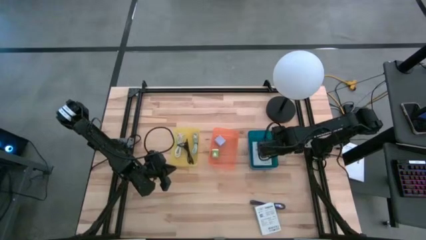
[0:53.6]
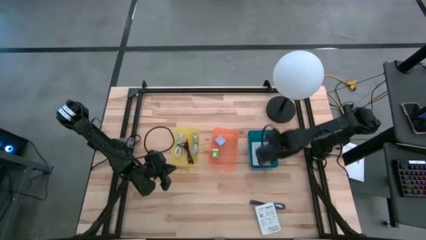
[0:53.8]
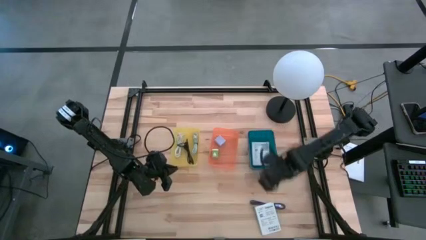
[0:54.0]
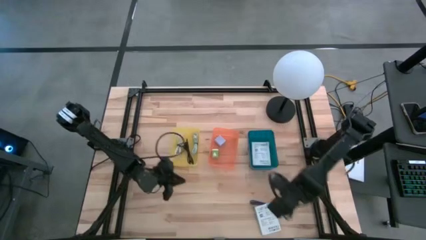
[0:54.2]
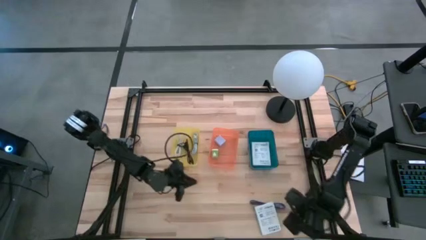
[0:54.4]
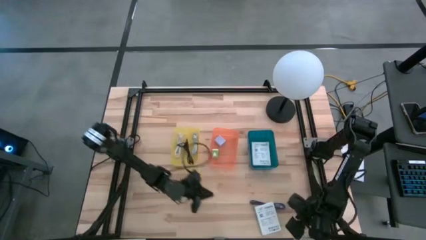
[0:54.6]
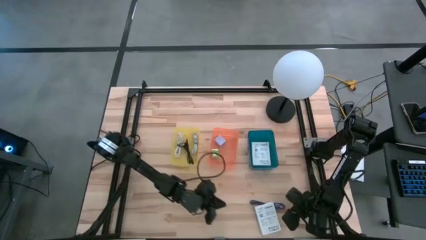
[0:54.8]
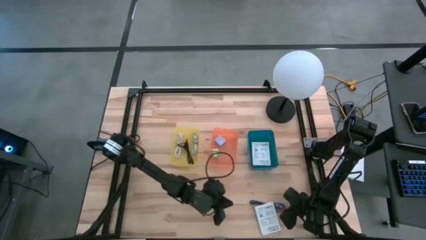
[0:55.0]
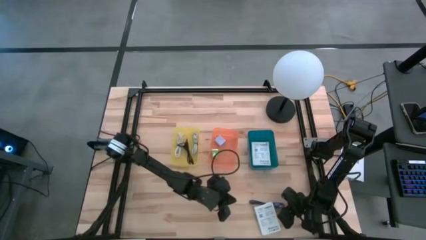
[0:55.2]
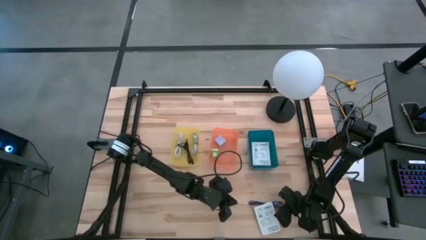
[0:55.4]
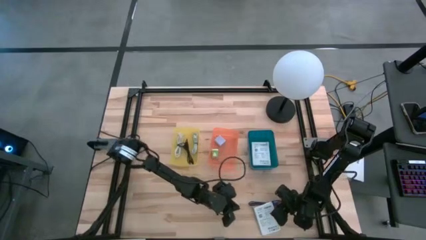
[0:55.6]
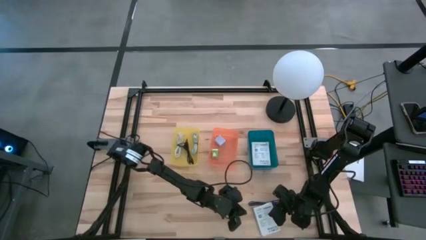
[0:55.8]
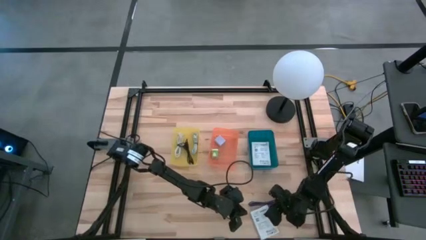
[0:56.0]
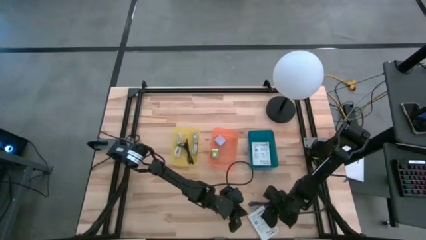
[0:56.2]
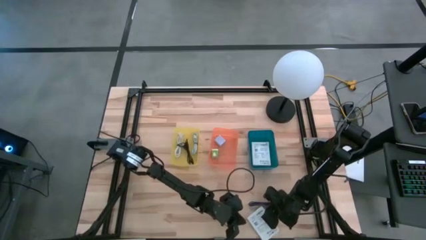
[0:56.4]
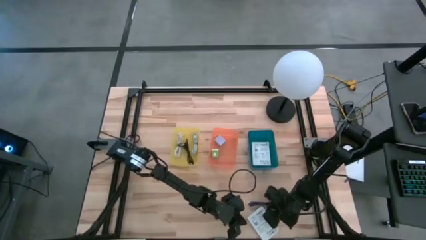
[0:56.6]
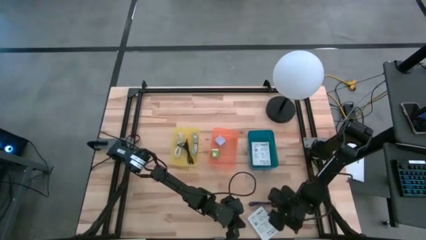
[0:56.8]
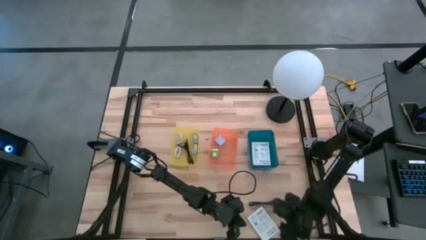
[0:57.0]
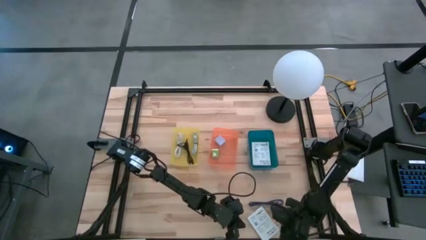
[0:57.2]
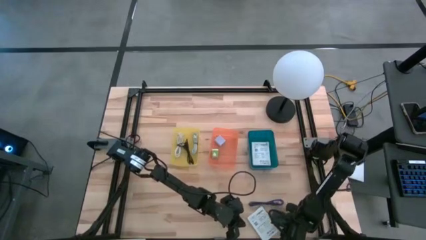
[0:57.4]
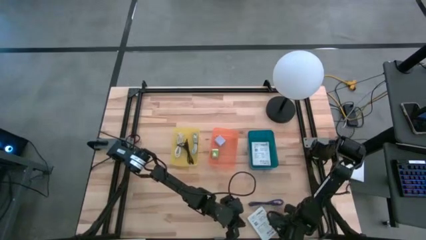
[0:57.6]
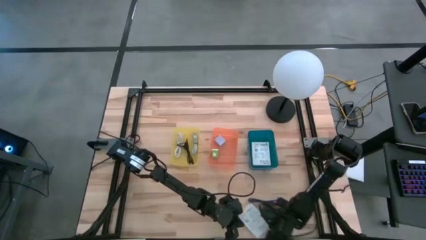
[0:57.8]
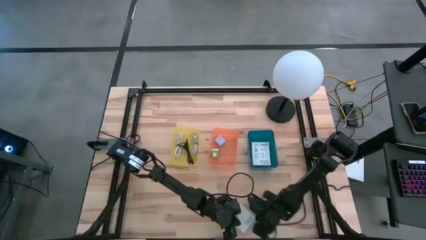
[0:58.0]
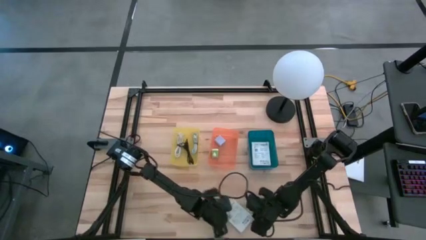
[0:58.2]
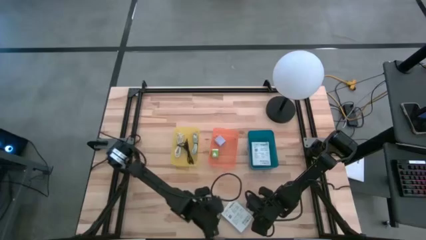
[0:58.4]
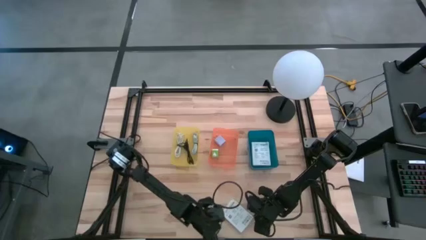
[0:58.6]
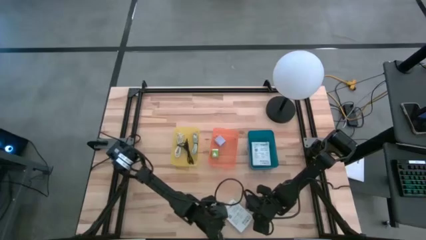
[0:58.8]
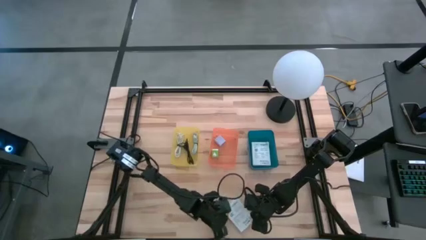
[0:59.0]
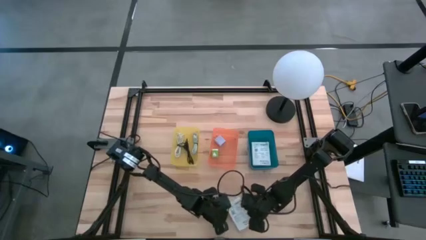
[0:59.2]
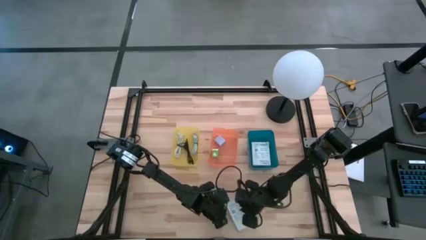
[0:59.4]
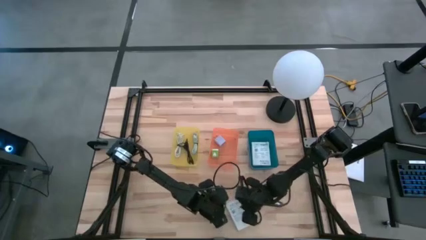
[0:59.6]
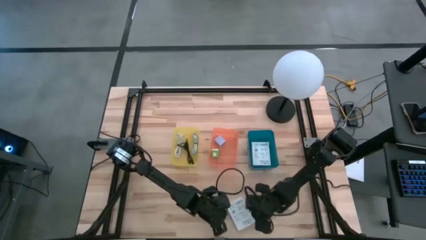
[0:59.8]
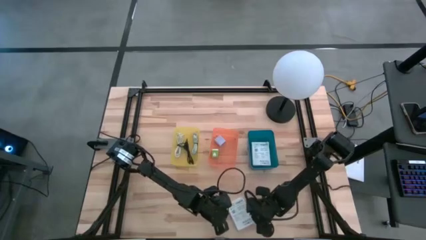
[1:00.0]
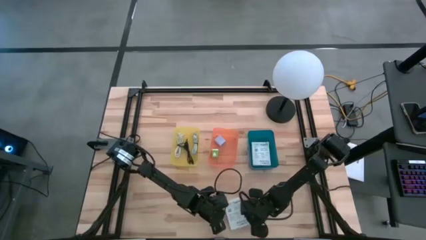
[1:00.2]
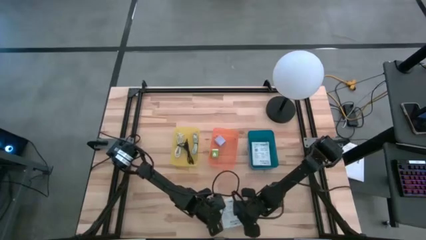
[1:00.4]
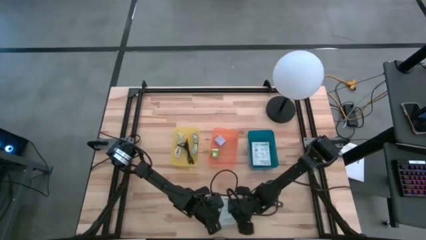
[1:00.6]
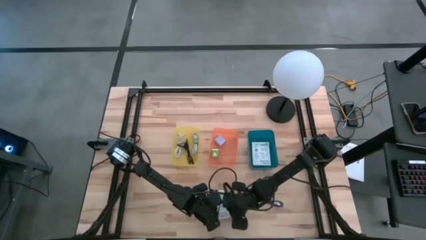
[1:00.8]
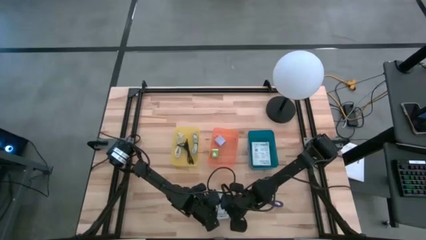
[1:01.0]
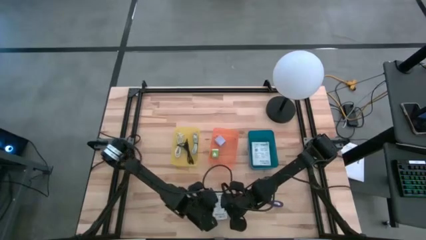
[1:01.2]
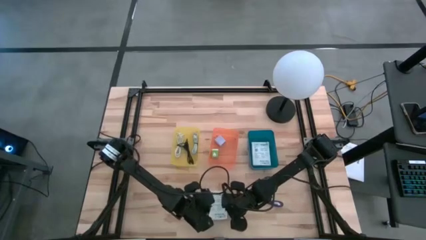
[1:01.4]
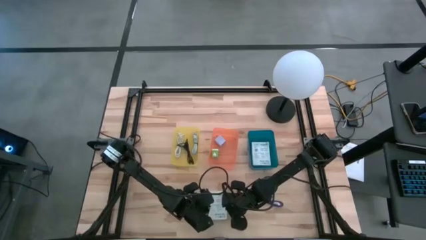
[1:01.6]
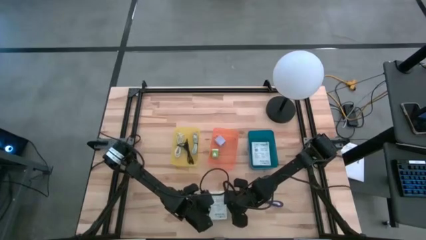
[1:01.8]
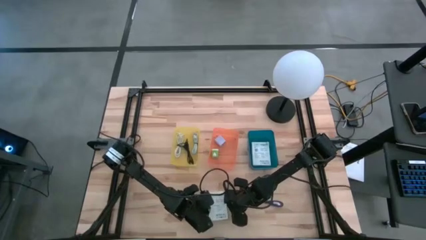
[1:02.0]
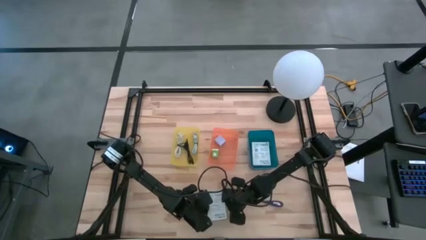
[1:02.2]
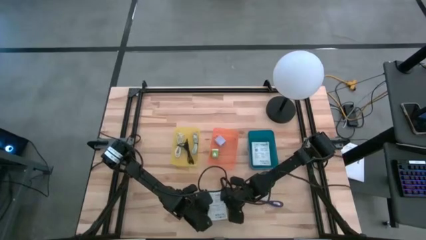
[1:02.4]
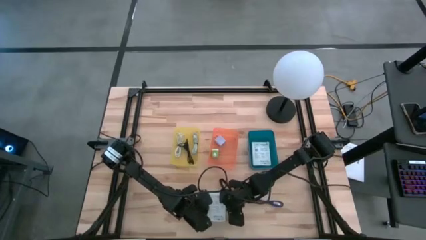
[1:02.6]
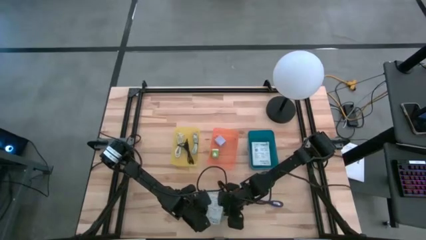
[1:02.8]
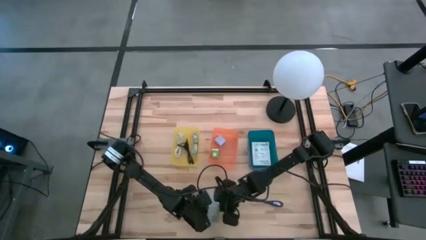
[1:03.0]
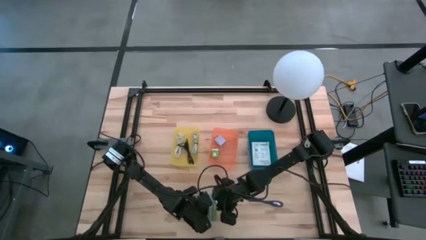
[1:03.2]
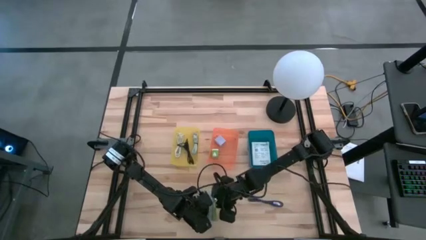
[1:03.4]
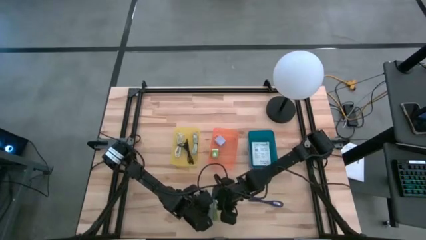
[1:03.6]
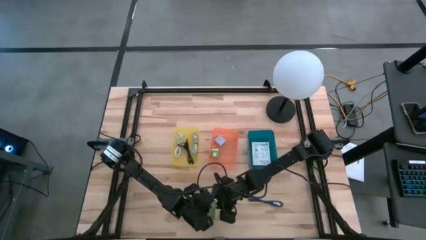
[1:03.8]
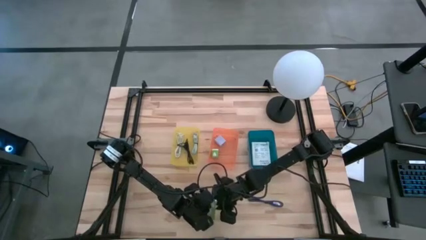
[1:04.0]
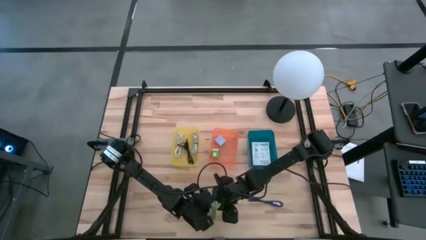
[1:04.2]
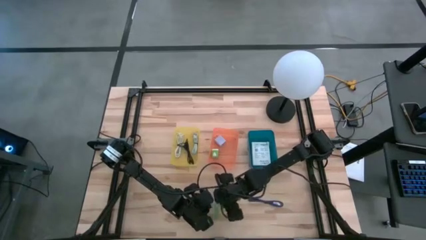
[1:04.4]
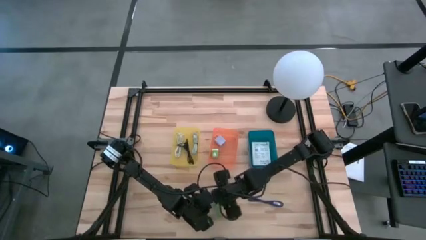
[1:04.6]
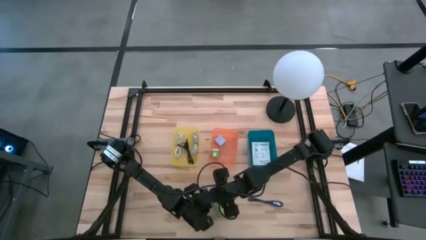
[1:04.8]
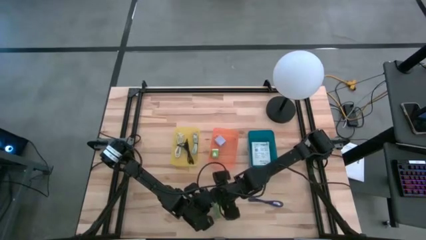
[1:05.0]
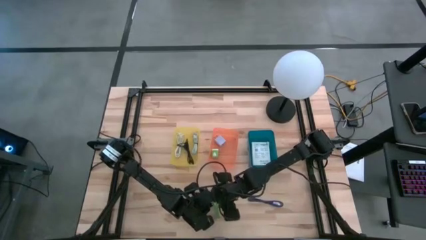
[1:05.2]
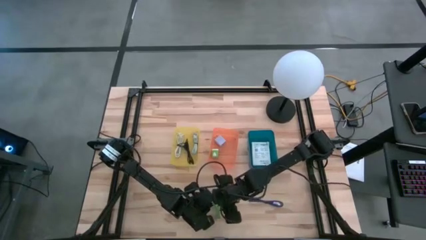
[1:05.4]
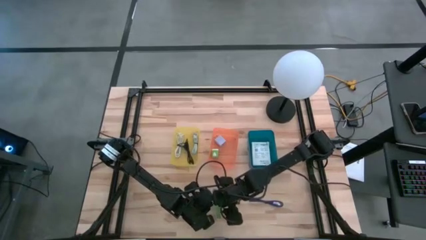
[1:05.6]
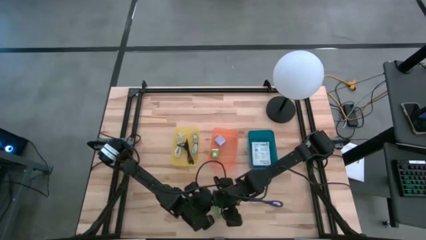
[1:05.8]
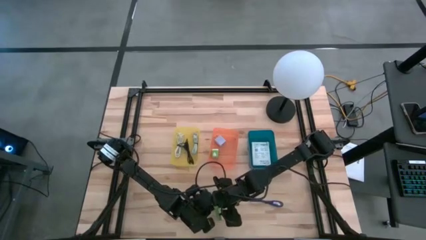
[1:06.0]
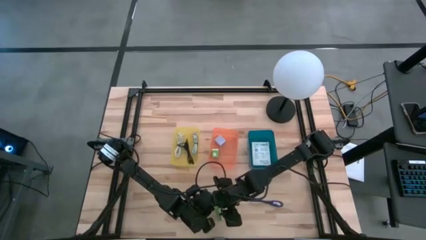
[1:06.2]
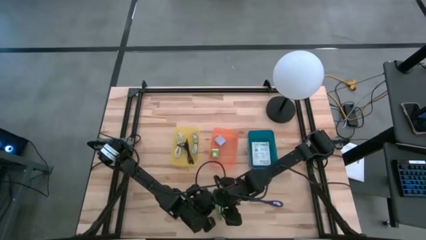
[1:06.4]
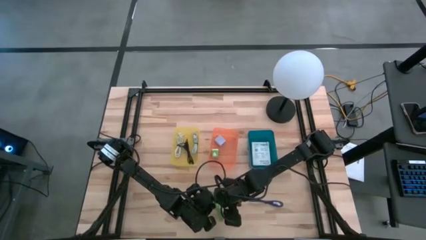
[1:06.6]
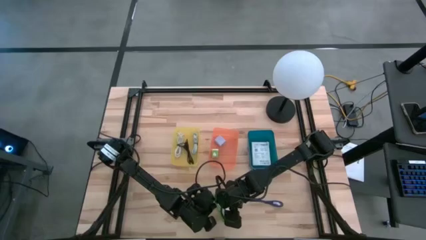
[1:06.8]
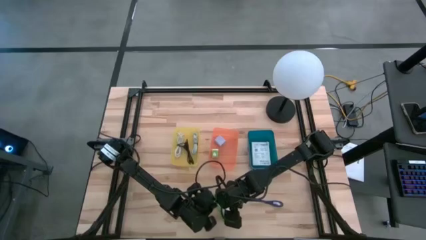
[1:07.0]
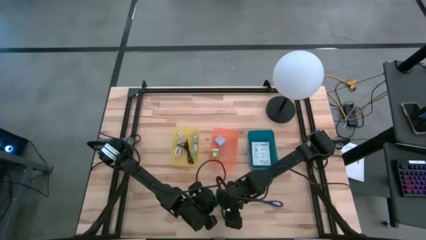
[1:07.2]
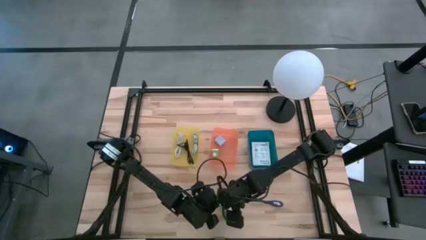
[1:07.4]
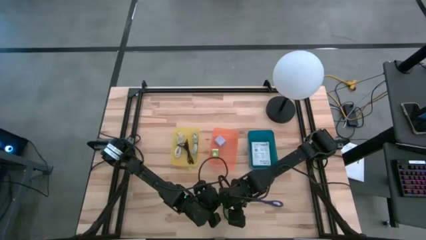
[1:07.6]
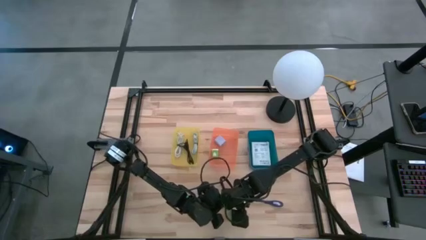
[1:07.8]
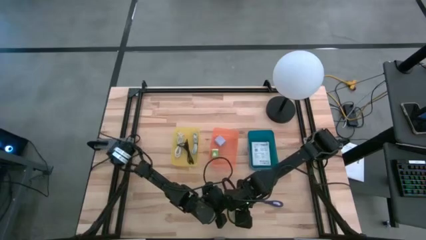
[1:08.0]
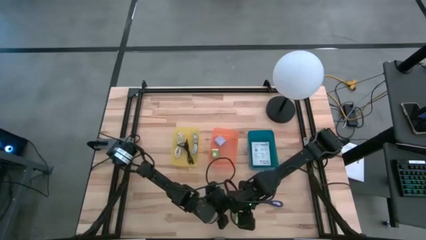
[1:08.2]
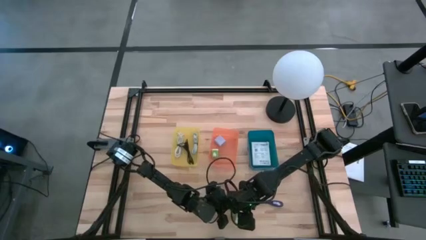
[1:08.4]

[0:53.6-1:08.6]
Task: Pick and place items into bin
Put the white card reader box into the blue bin

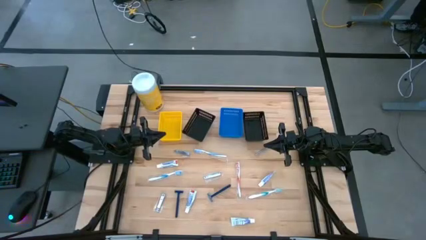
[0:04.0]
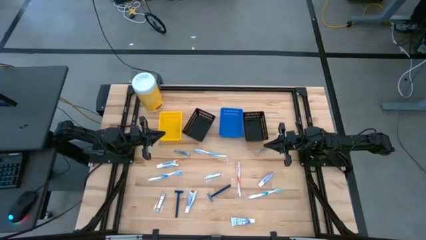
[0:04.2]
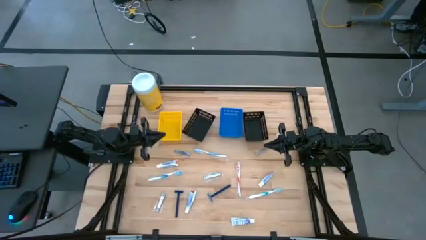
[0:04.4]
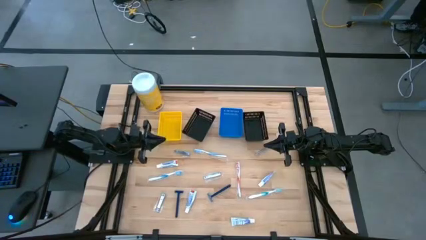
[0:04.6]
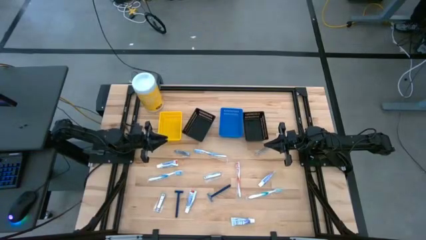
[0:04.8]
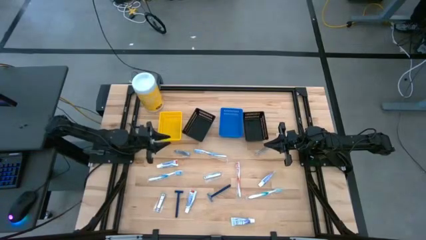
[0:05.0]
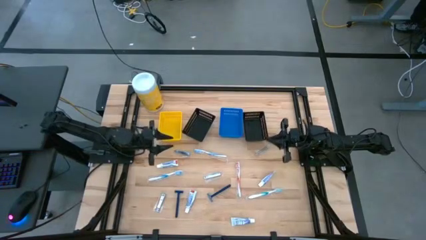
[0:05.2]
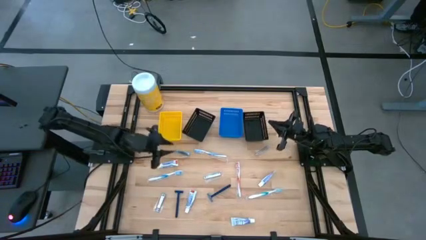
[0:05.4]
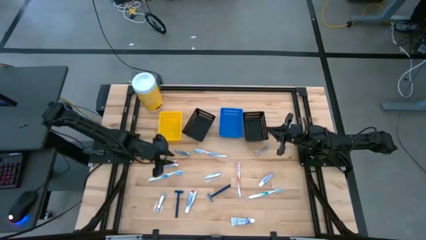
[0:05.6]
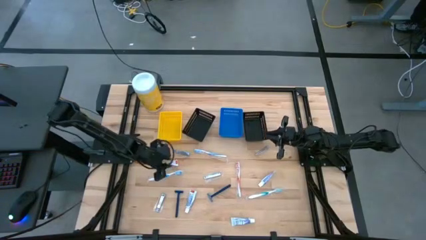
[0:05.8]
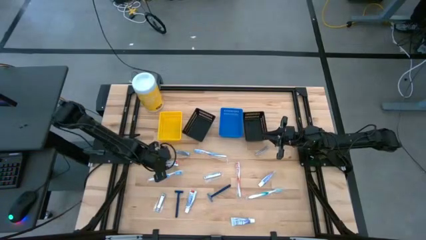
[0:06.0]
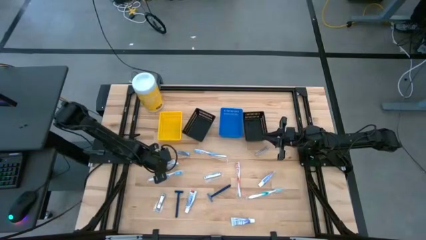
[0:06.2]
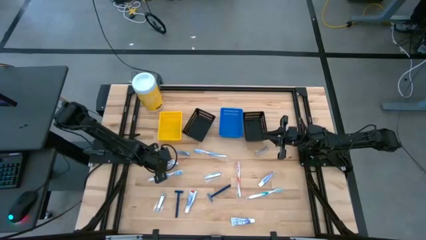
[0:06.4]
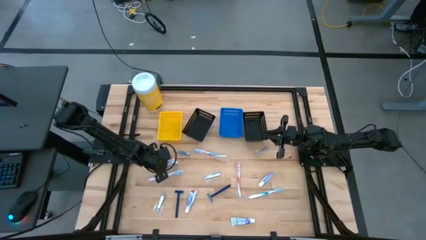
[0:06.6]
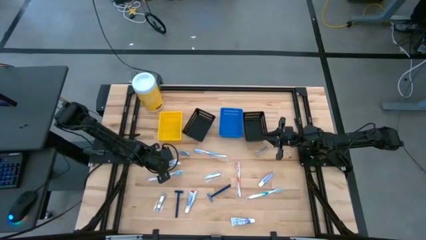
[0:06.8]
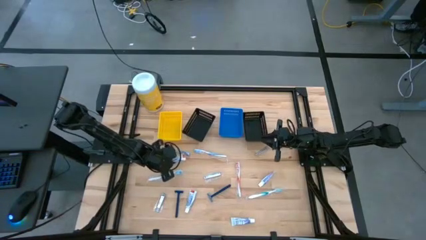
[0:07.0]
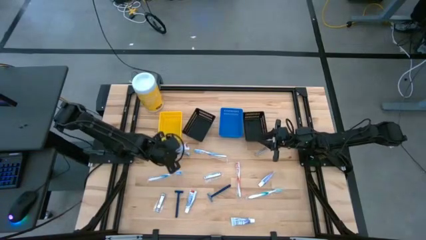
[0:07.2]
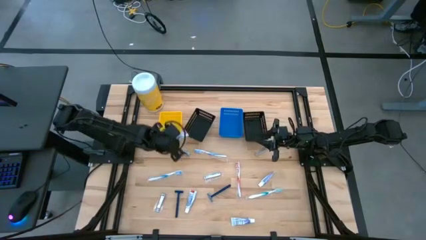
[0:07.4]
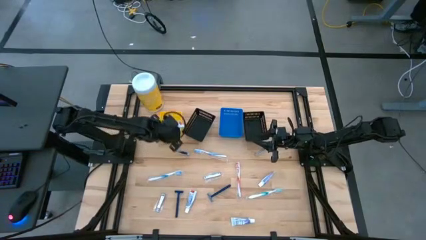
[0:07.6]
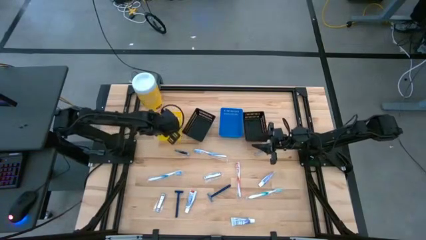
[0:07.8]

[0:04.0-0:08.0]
Task: Pick & Place Travel size toiletries
Put the white toothpaste into the yellow bin
